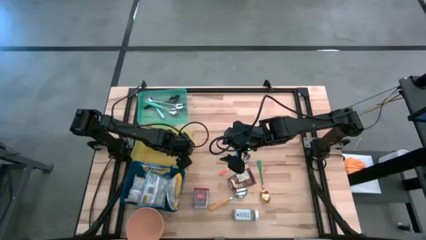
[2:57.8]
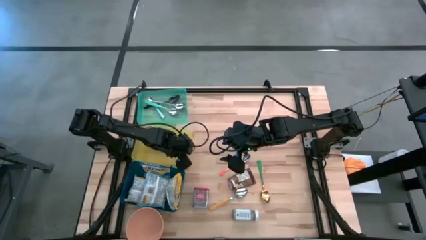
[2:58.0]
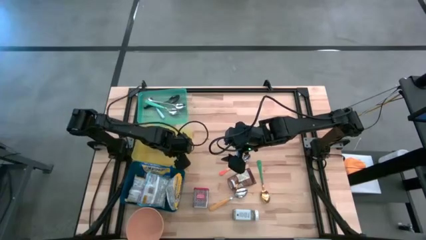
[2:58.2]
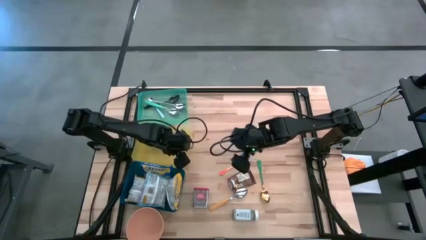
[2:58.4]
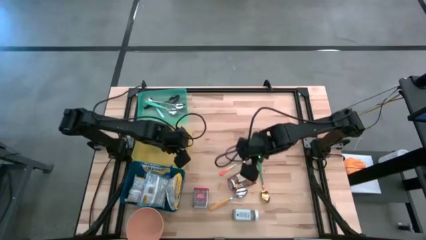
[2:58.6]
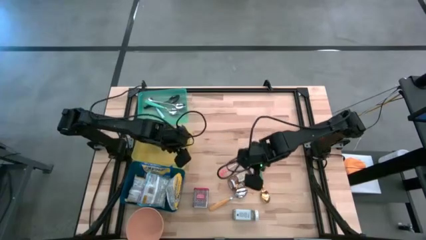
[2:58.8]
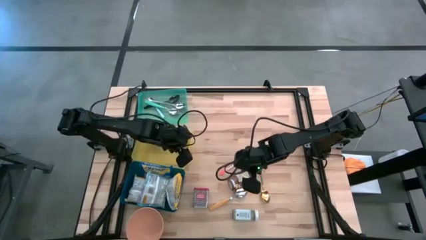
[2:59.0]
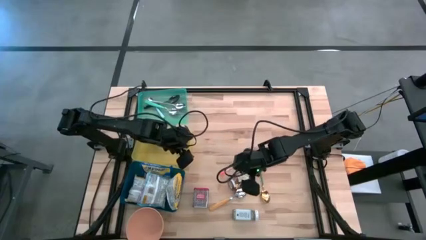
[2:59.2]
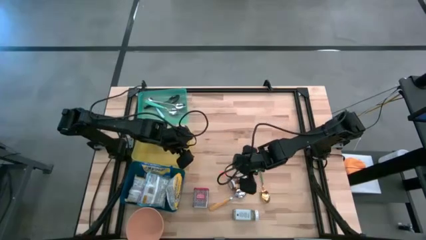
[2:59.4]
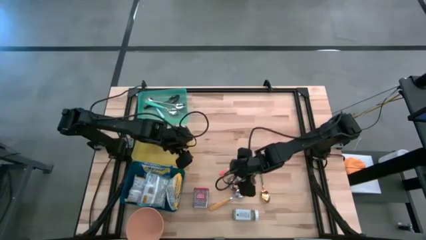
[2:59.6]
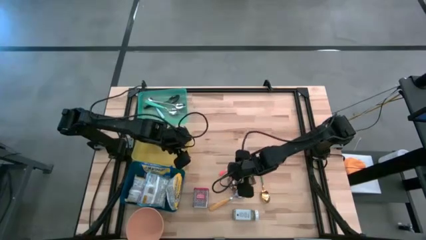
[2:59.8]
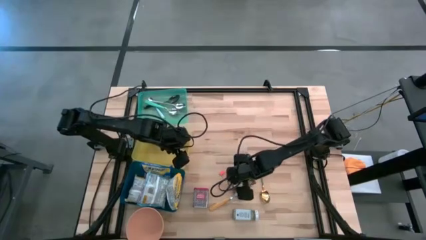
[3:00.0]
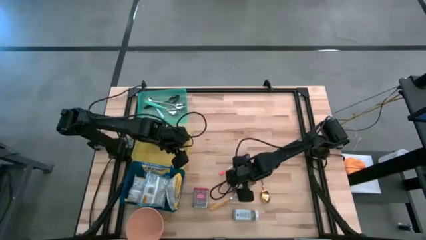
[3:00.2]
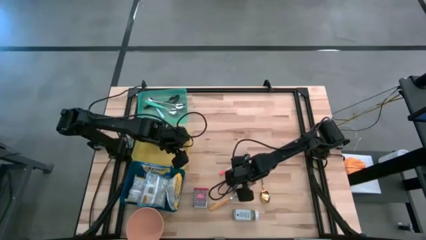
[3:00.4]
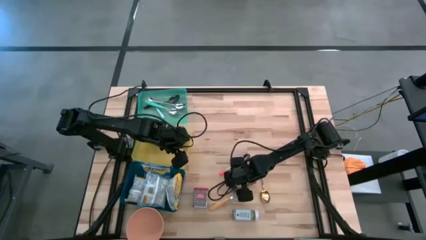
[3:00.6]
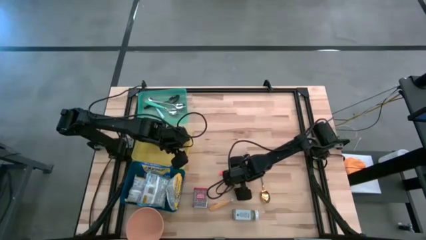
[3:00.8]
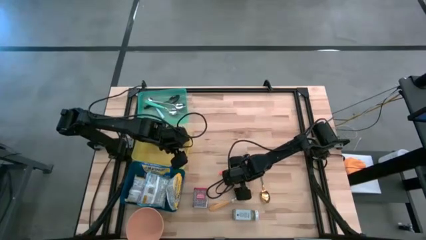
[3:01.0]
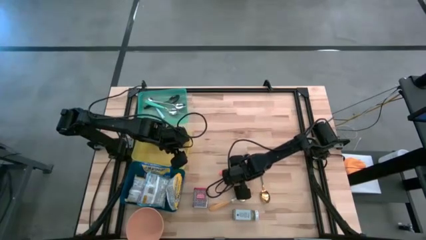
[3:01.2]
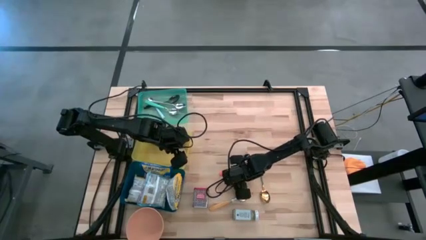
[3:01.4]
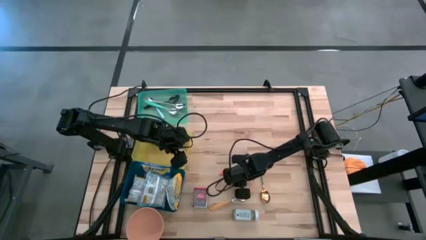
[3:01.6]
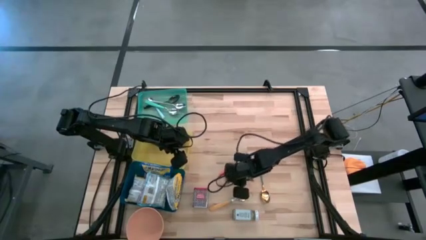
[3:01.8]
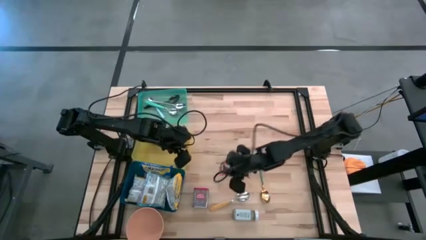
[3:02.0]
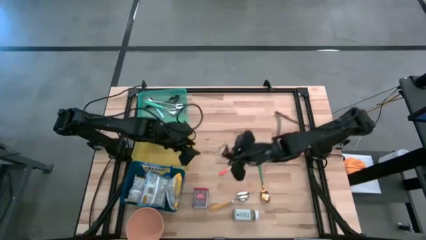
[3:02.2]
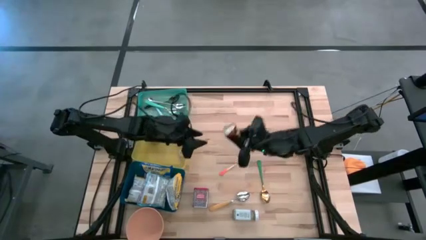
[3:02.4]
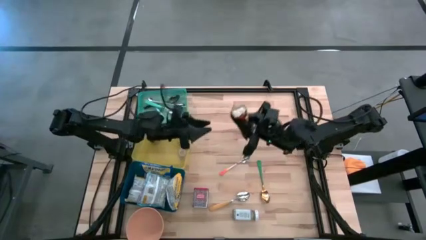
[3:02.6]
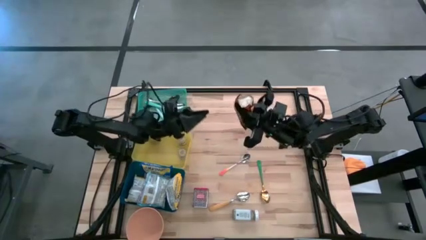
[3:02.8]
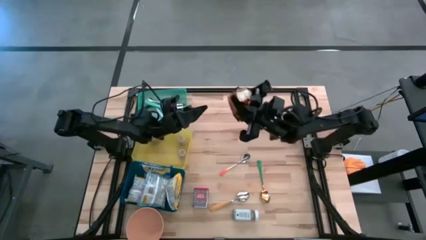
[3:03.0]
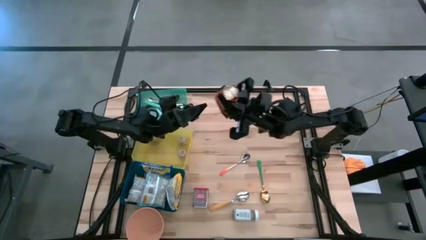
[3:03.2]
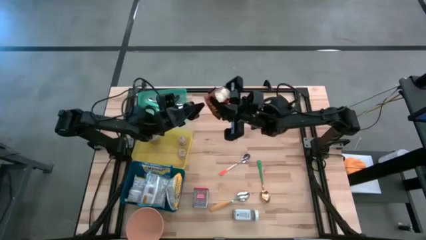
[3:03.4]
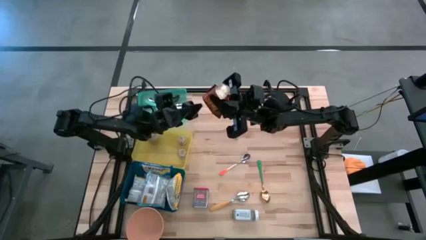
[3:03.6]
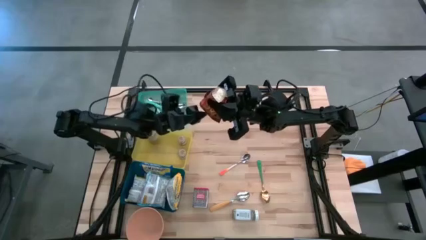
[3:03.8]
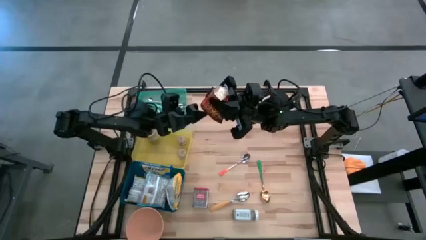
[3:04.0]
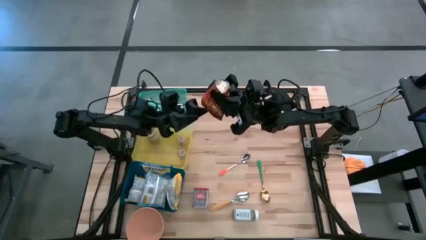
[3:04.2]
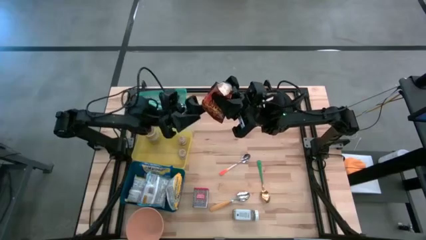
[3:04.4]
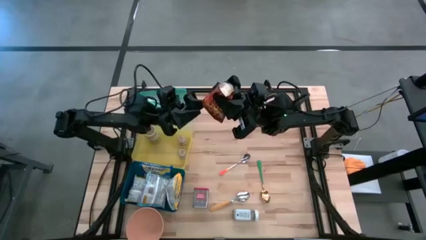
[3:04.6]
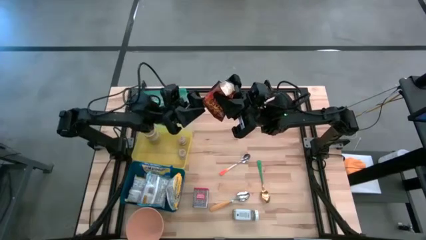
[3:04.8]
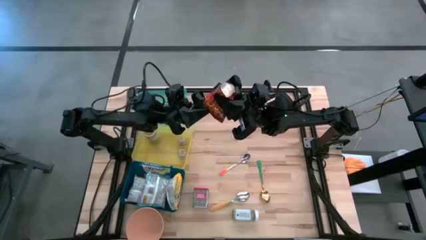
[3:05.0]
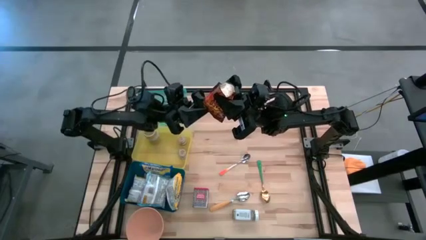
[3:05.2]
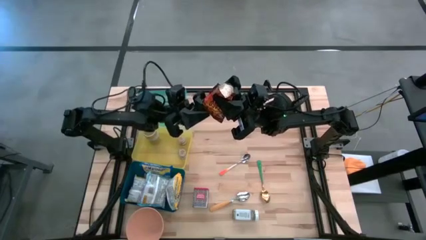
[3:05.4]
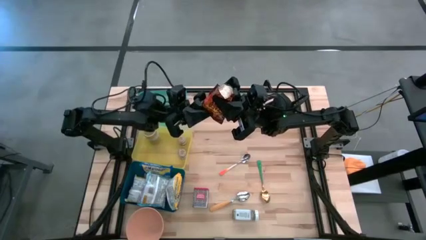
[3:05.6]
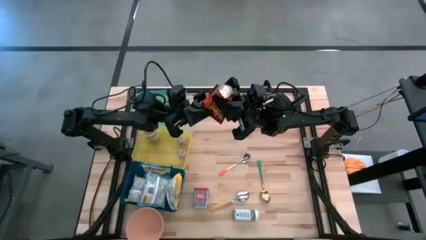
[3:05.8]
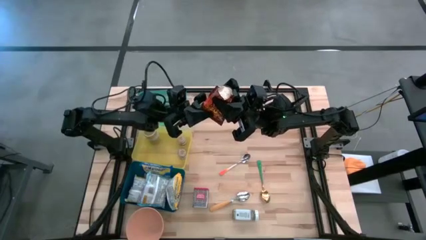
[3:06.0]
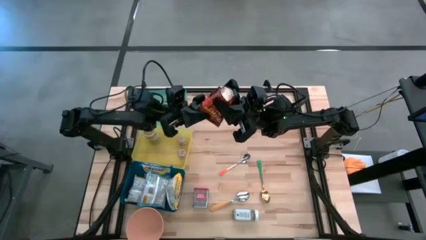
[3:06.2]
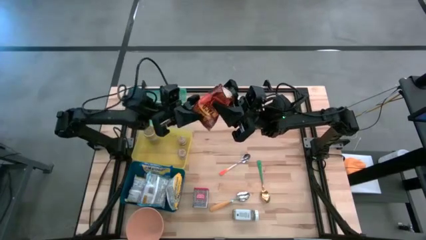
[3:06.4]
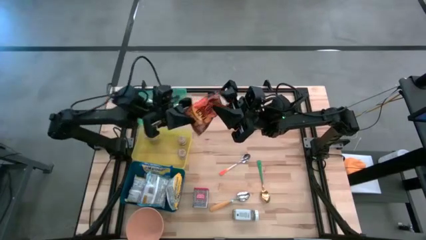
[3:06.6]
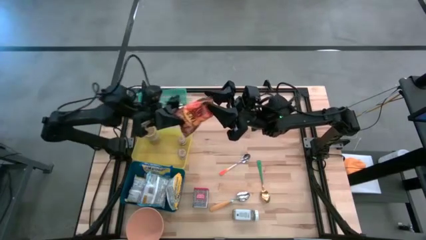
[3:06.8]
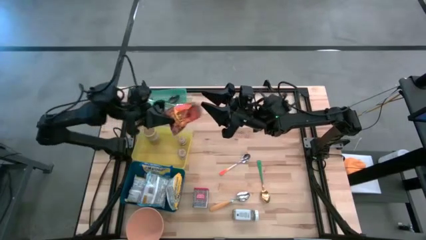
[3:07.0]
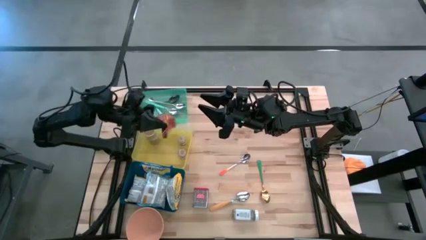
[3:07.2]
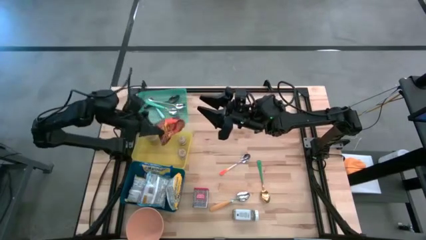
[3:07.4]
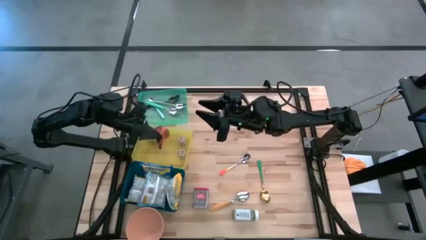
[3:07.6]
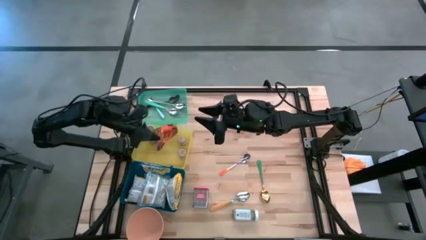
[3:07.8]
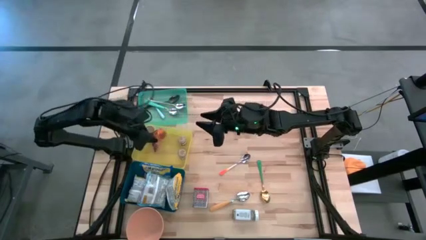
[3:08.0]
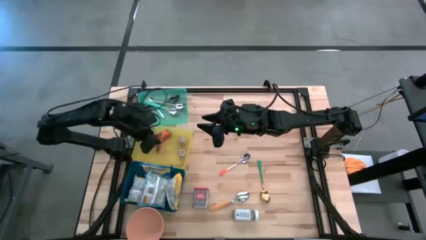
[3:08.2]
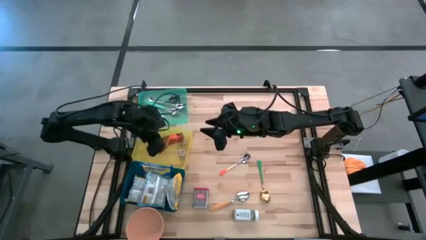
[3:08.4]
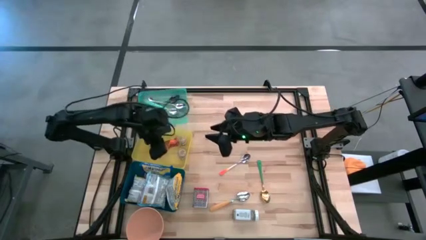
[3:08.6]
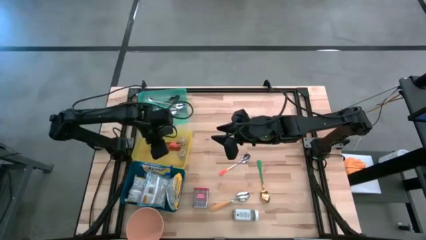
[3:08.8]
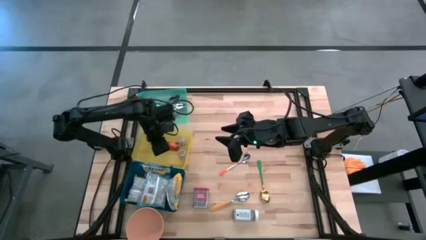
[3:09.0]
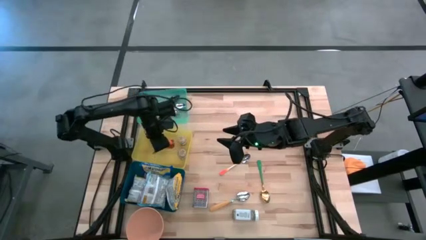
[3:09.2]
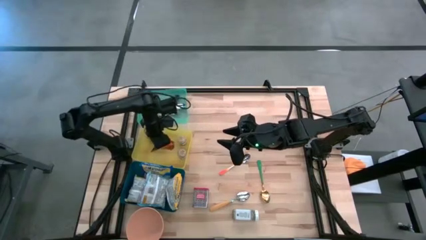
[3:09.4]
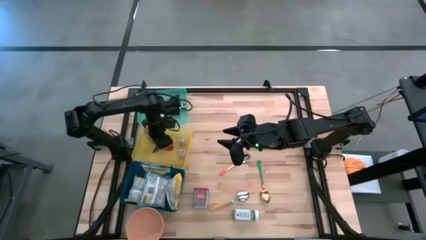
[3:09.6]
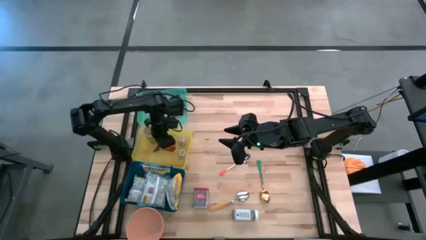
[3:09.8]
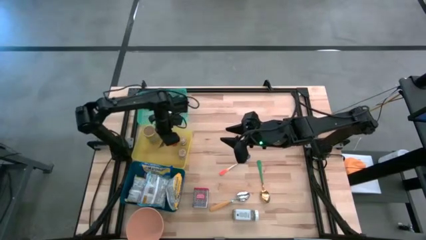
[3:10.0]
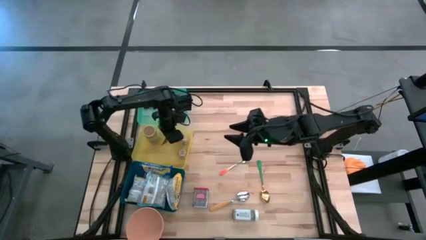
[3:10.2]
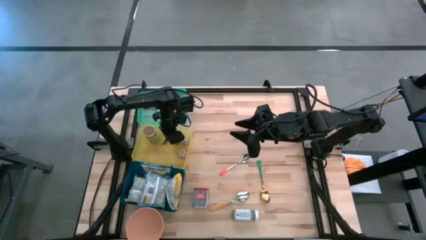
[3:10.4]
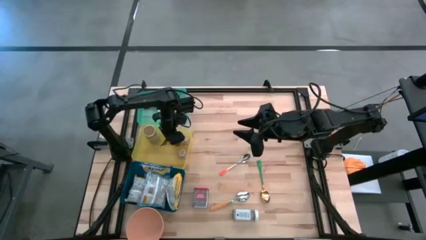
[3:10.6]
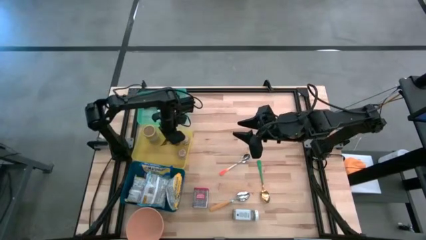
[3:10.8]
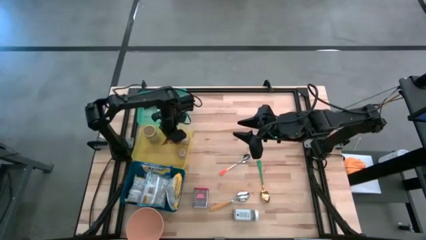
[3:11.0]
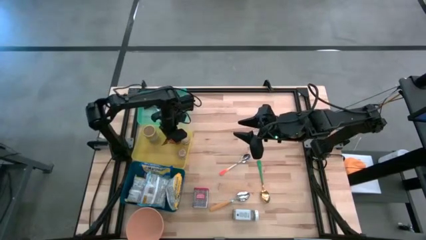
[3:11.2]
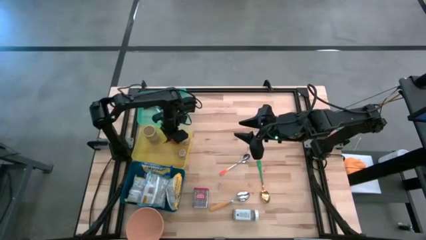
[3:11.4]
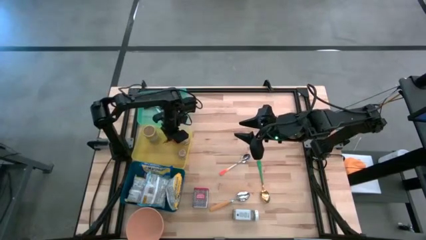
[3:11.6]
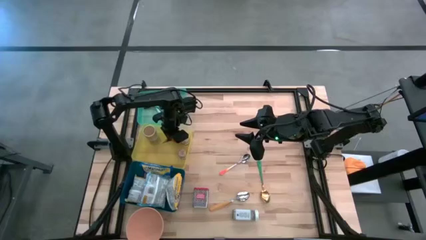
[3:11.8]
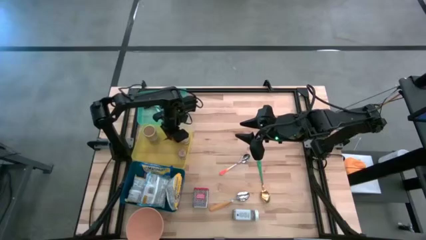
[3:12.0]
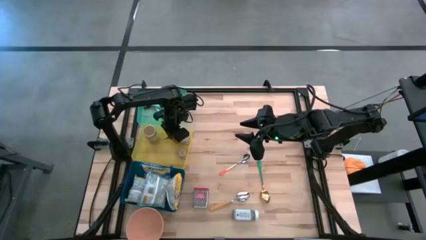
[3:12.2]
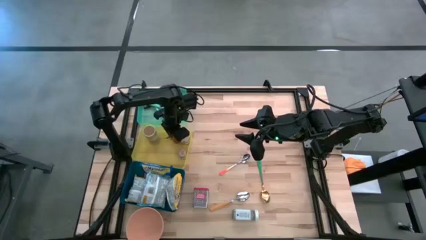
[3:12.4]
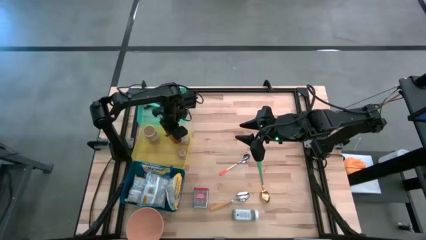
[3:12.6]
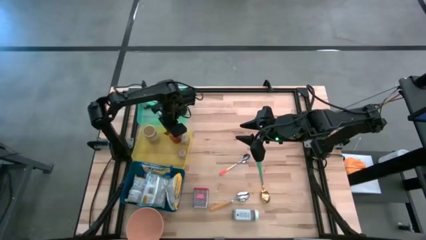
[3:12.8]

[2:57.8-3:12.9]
Put the orange seasoning pack into the yellow bin
